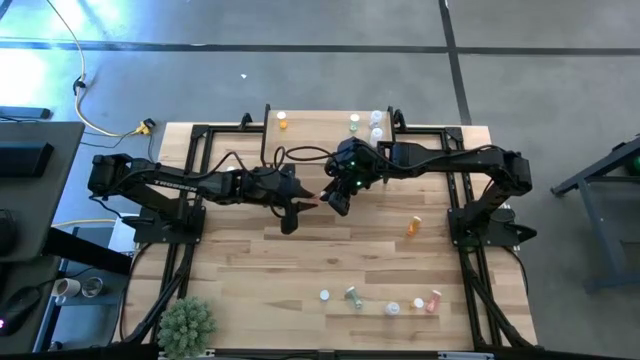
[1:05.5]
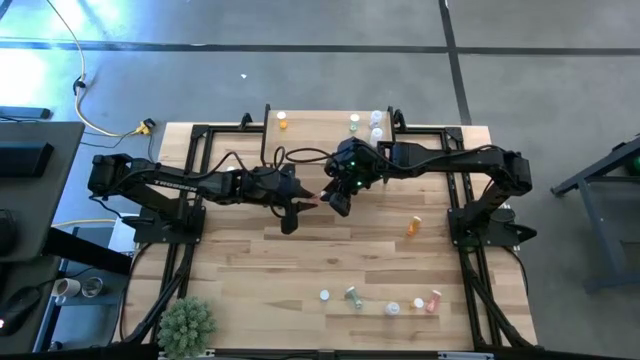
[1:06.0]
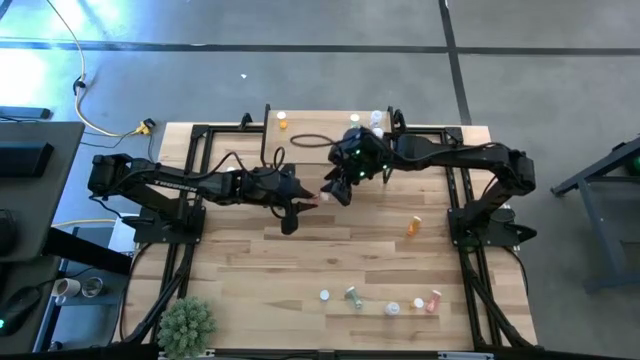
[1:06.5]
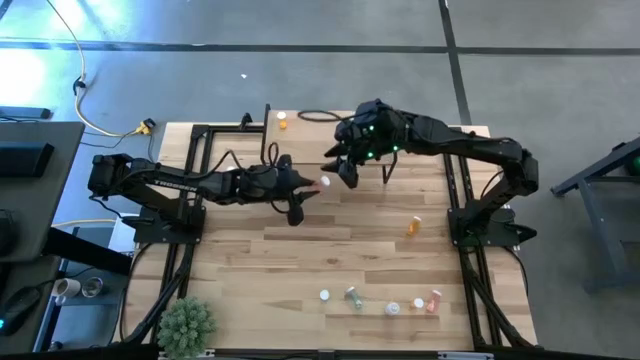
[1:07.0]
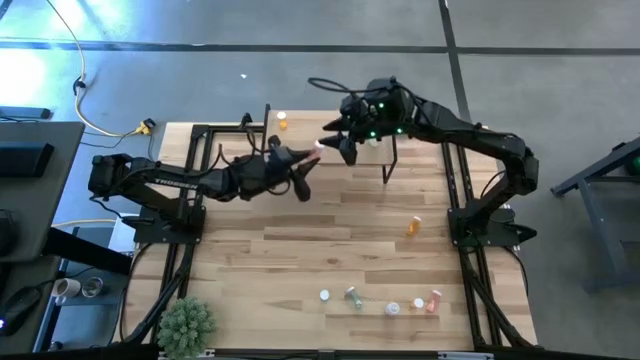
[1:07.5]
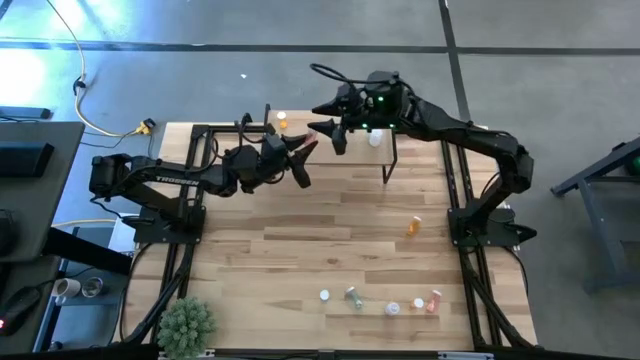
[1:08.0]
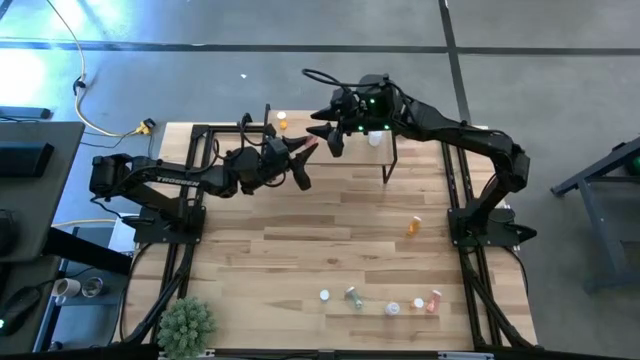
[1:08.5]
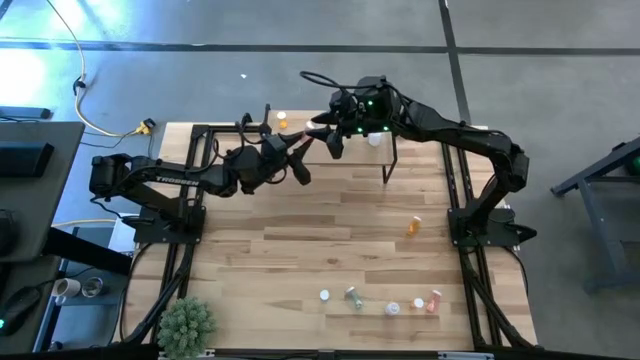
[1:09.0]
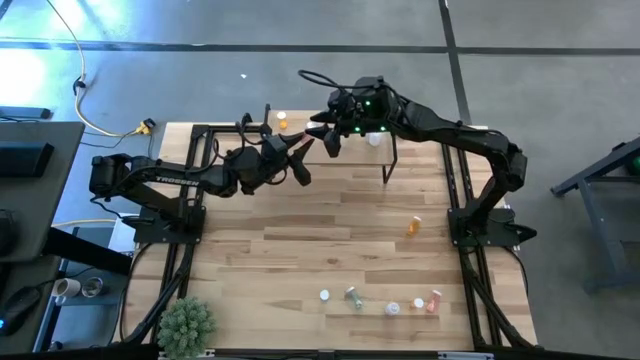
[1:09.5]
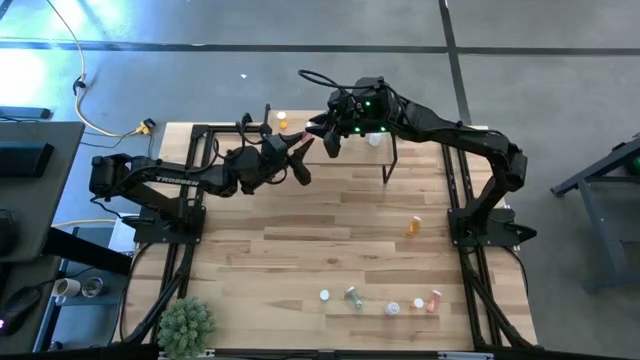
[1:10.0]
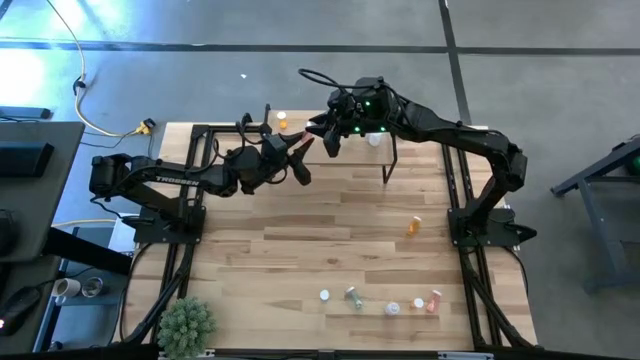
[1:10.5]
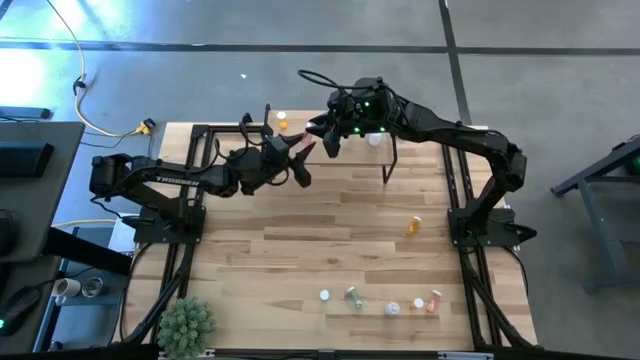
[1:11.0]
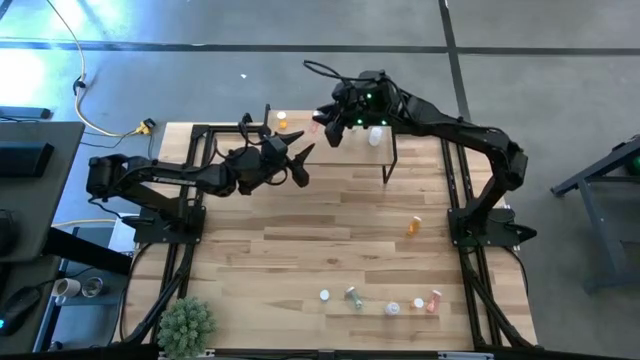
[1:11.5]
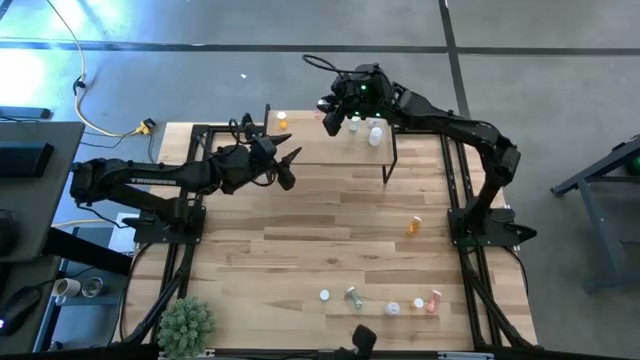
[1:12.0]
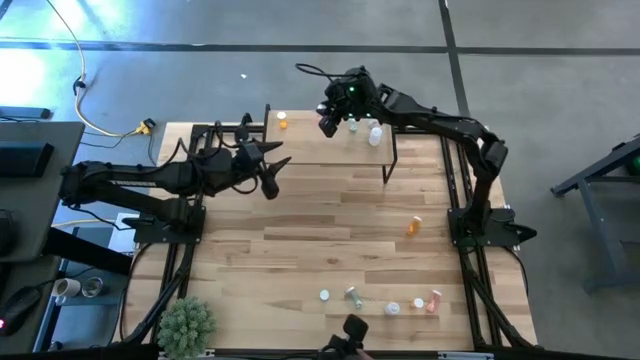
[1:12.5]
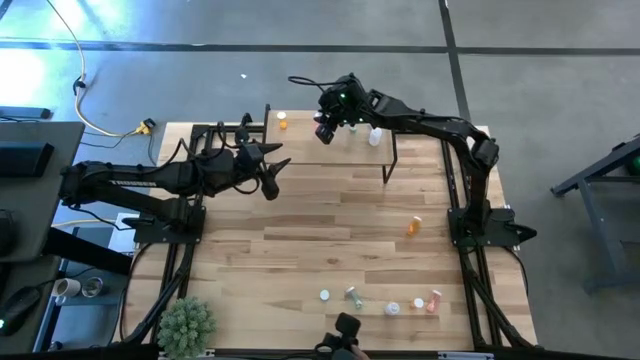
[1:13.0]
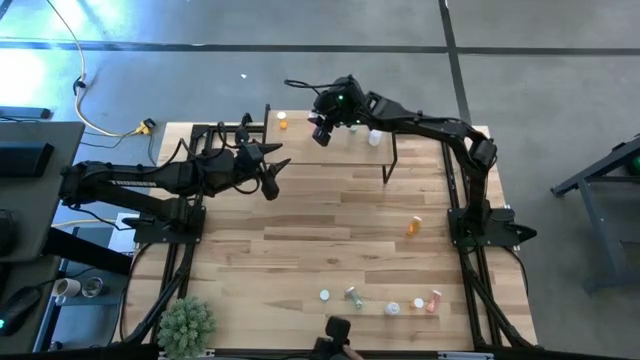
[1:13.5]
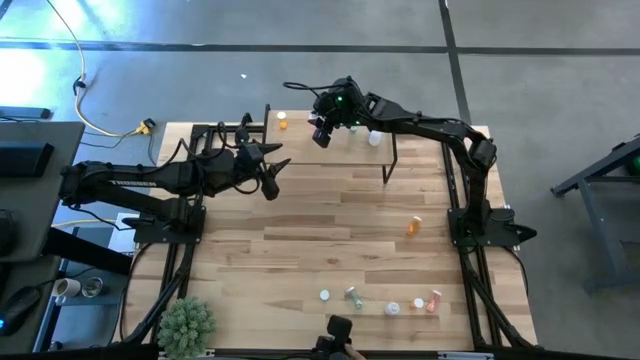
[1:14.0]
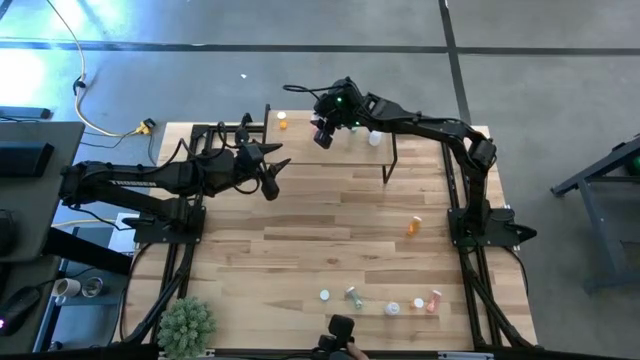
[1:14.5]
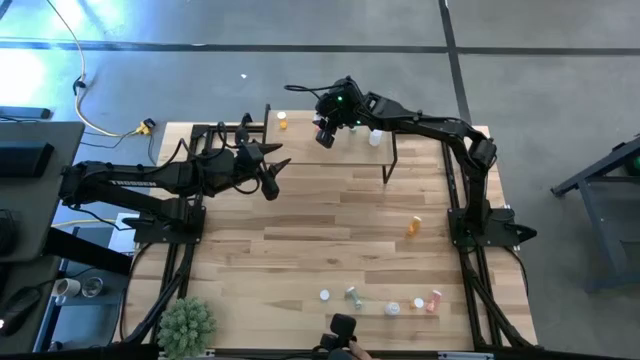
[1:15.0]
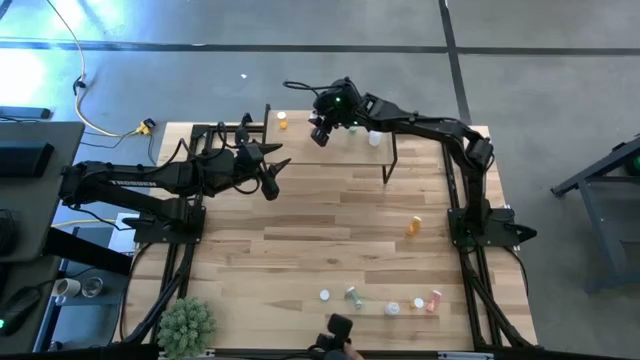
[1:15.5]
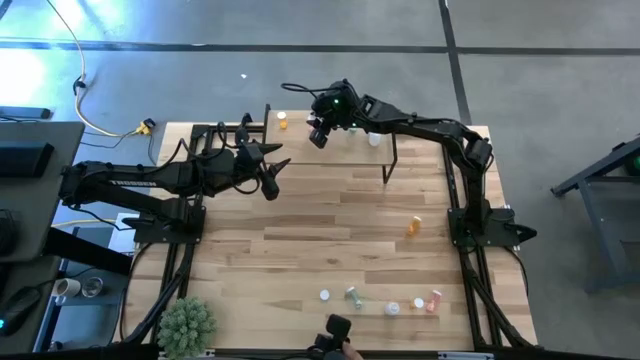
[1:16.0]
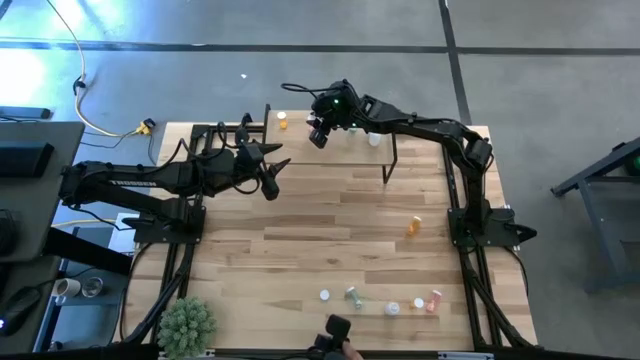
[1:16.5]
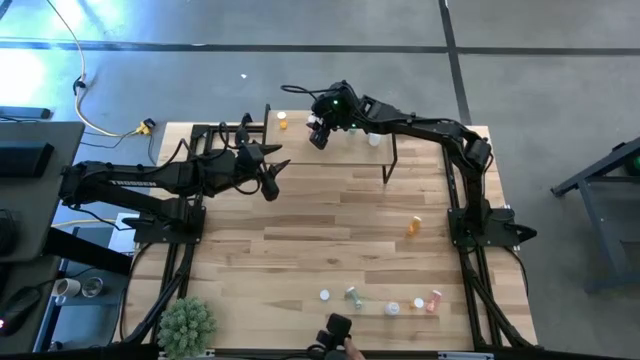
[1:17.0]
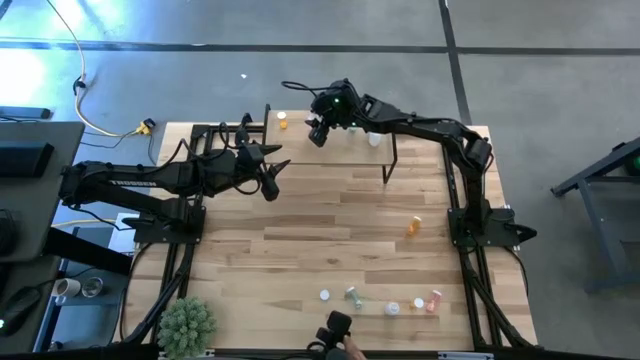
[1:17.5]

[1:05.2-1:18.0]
Task: Pick and place medicine bottles onto shelf by color
Put the top right pink pill bottle on the shelf

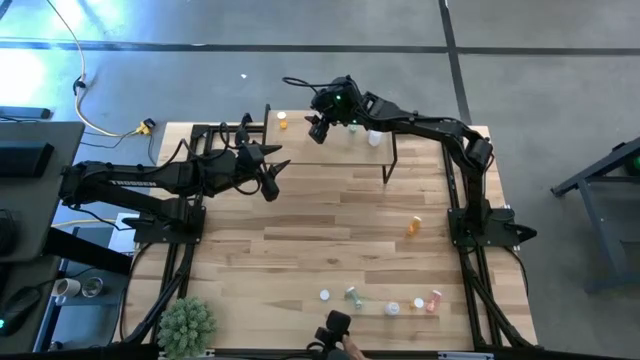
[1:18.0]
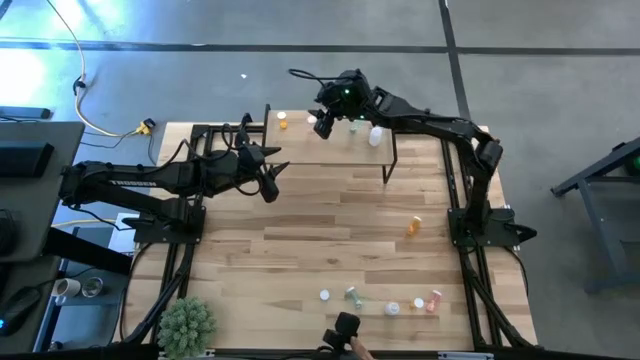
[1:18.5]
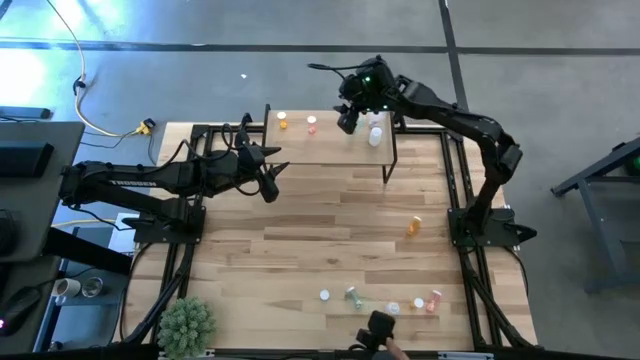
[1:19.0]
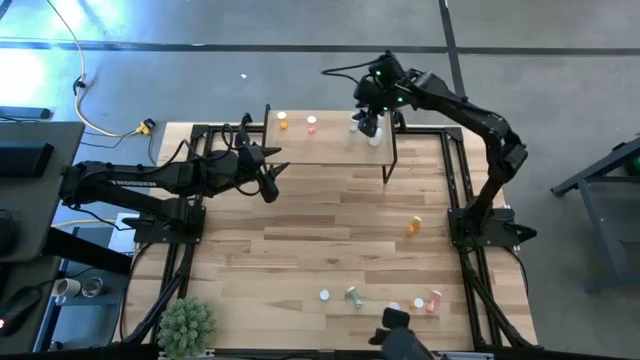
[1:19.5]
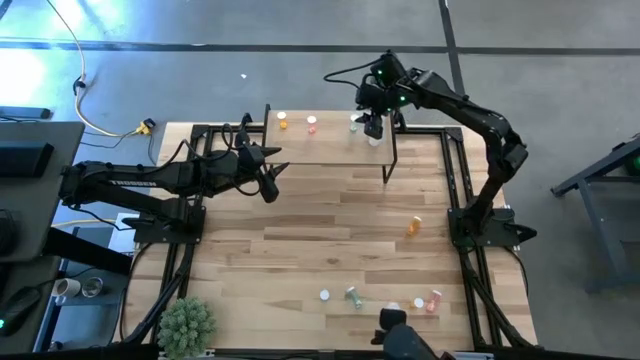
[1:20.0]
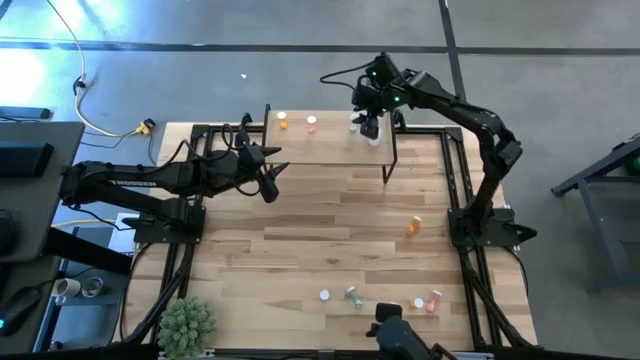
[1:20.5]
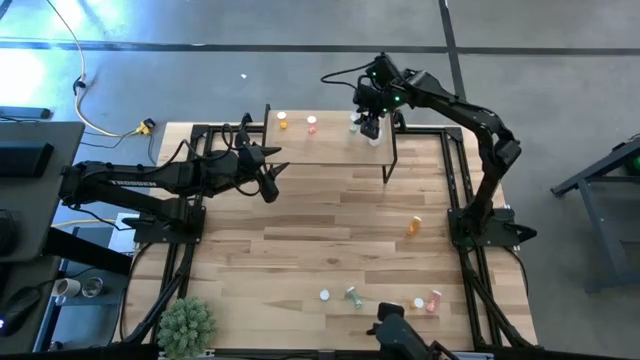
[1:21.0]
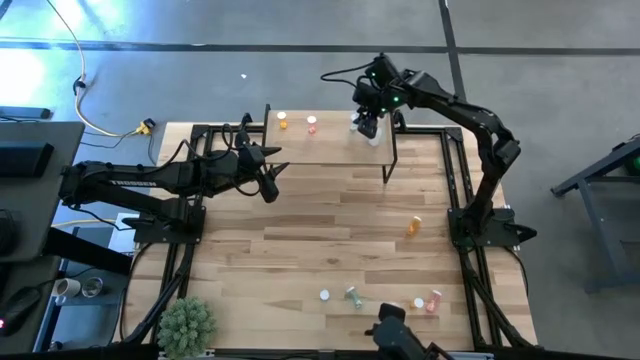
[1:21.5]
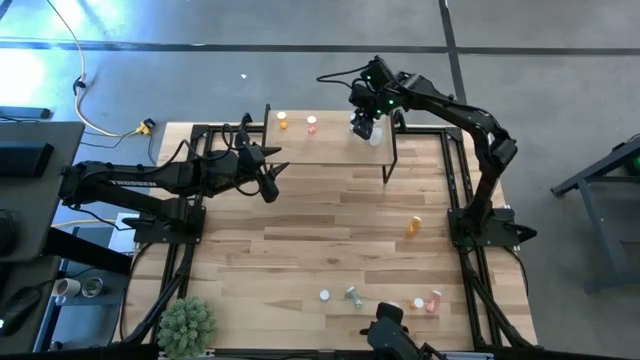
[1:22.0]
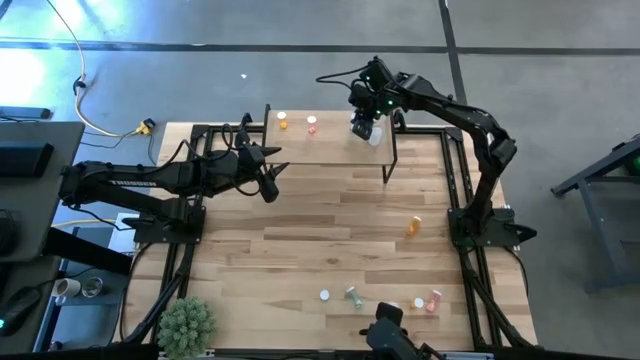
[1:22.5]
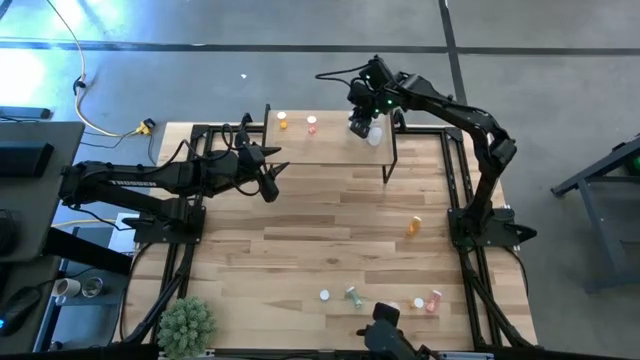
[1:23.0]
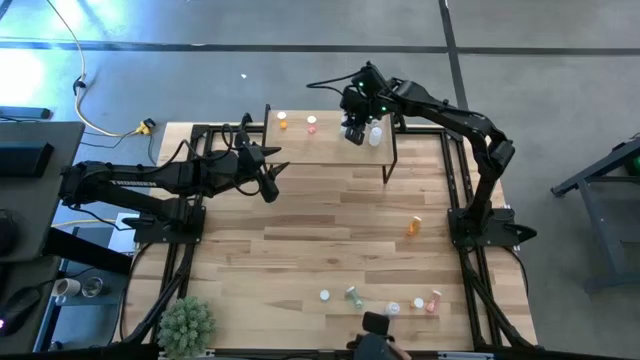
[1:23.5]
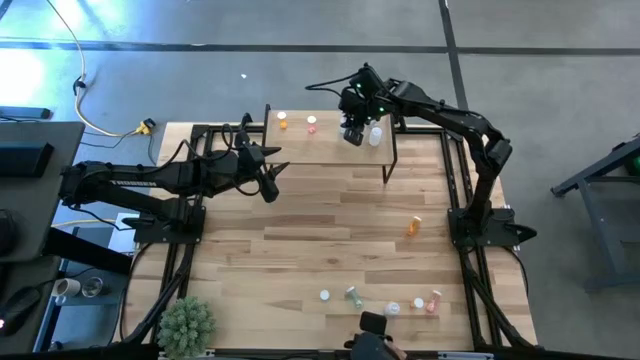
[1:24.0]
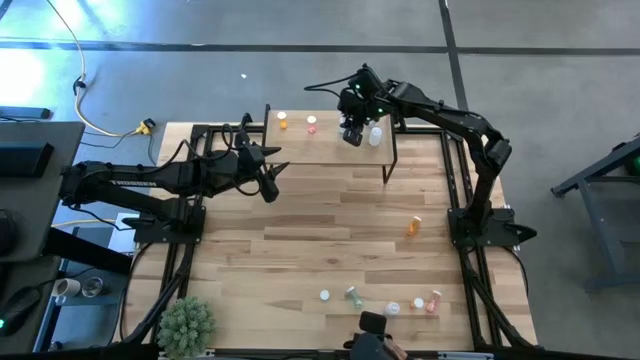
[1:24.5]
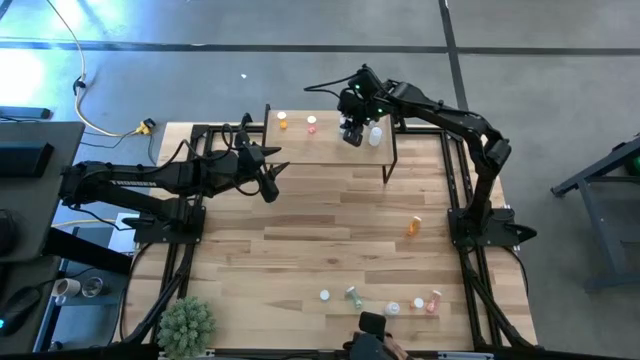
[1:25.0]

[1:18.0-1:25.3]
Adjust the blue pill bottle on the shelf

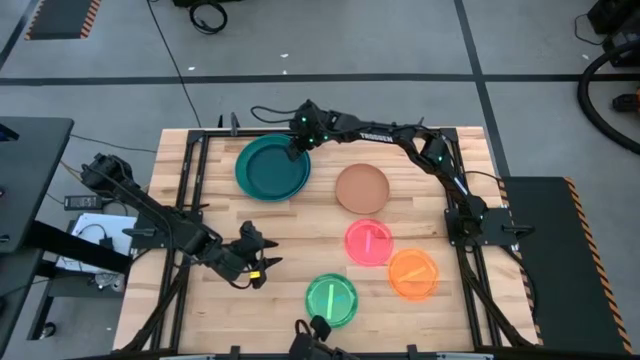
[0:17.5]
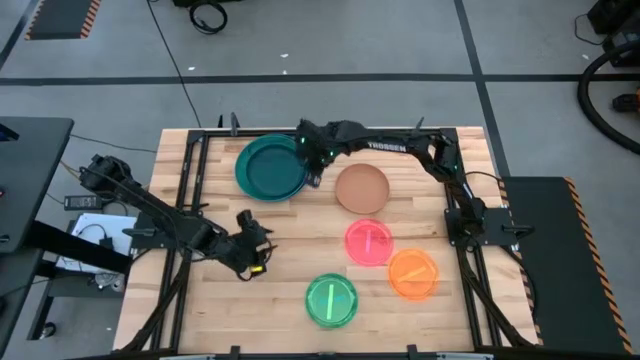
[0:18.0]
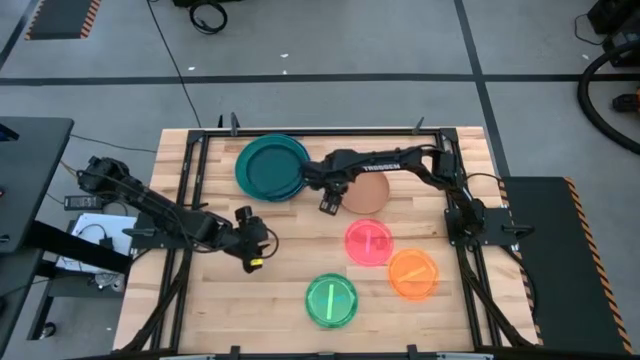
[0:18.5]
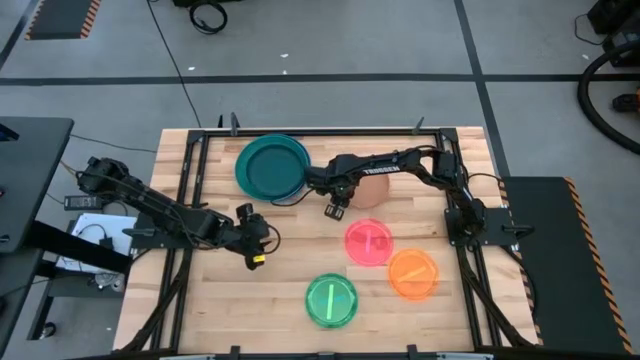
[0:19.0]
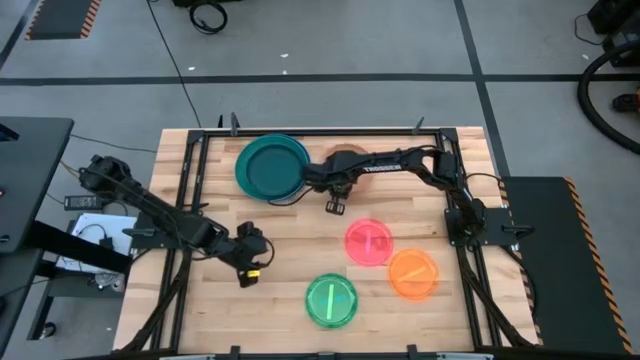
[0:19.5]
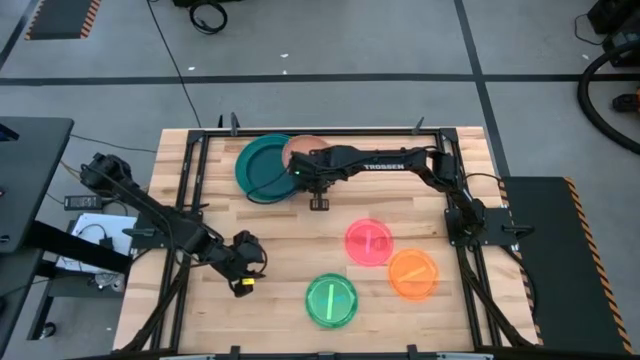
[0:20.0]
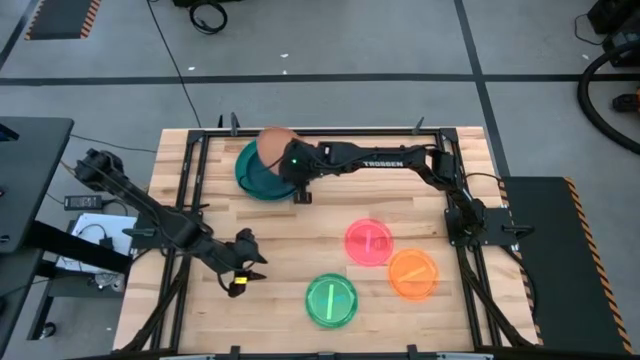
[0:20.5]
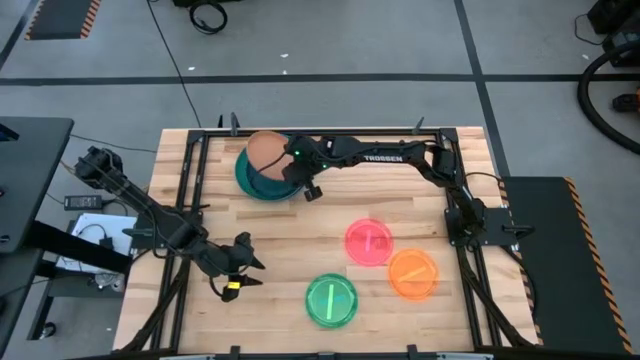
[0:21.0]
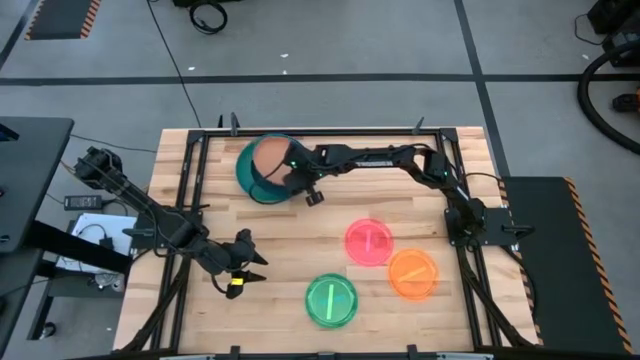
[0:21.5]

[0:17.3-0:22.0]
Task: Stack plastic plates
Stack the brown plate on top of the dark green plate
